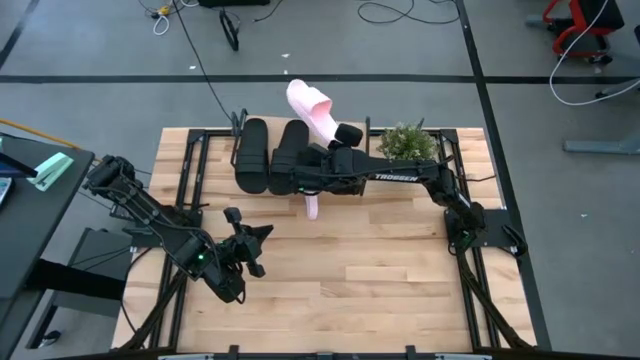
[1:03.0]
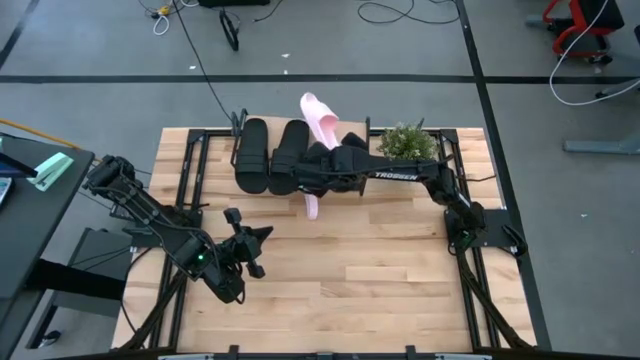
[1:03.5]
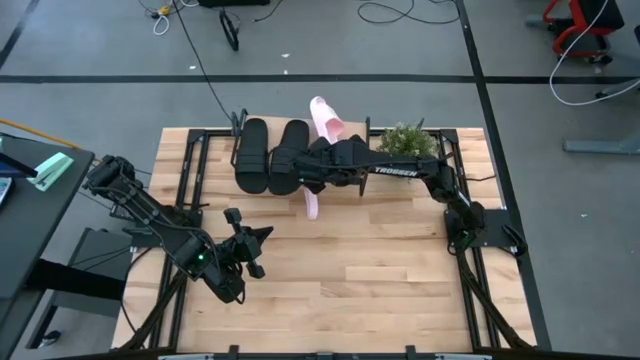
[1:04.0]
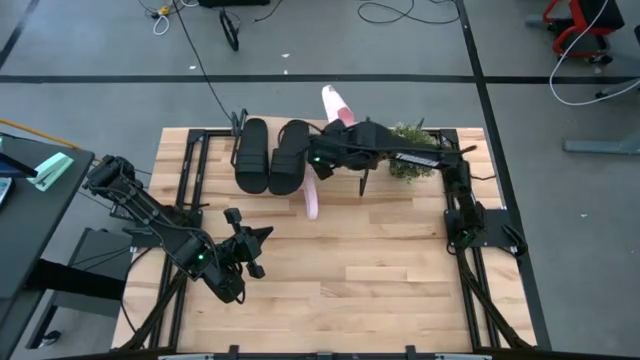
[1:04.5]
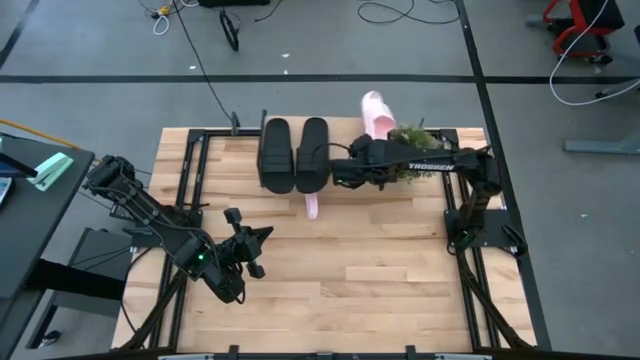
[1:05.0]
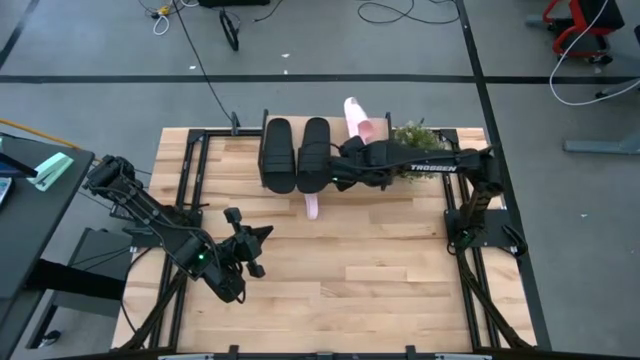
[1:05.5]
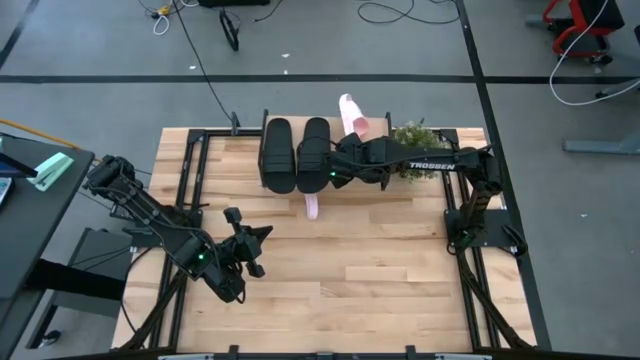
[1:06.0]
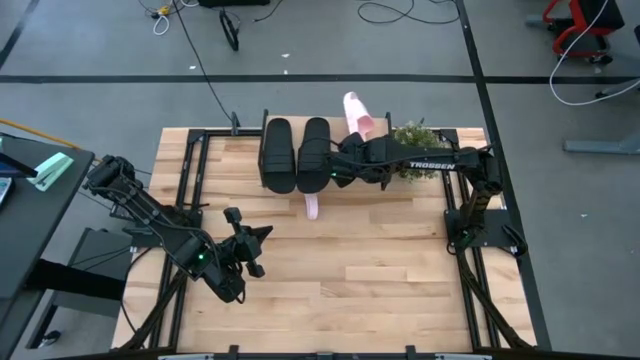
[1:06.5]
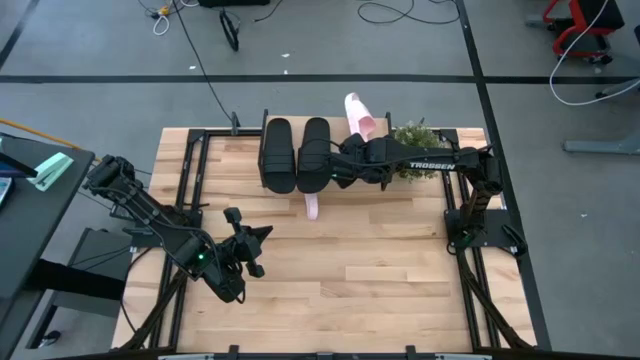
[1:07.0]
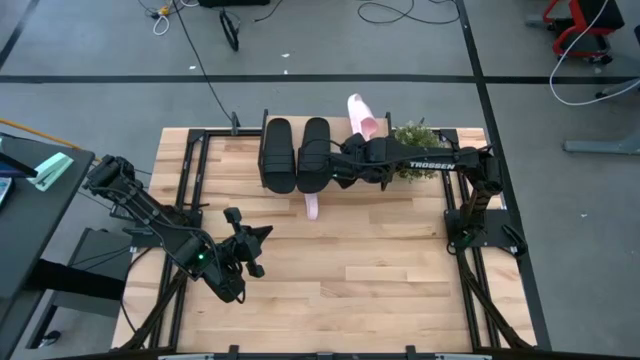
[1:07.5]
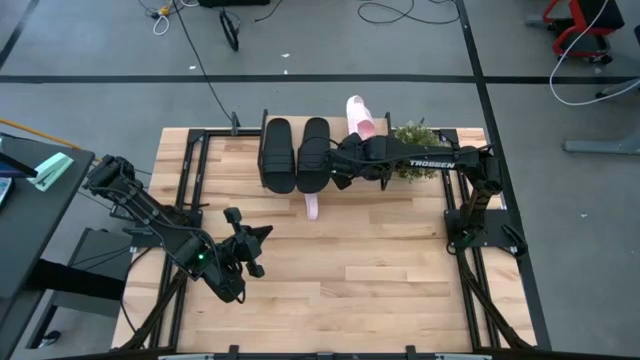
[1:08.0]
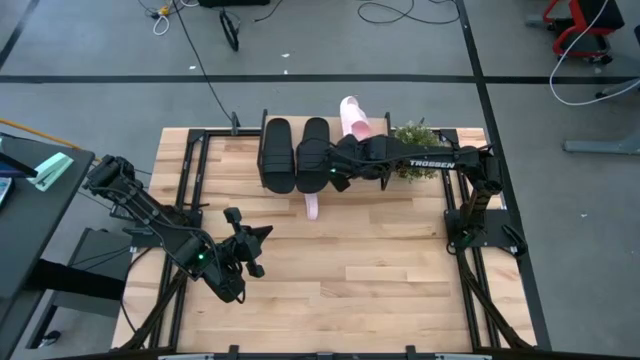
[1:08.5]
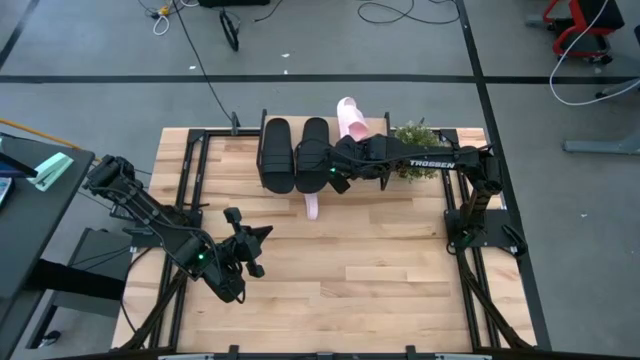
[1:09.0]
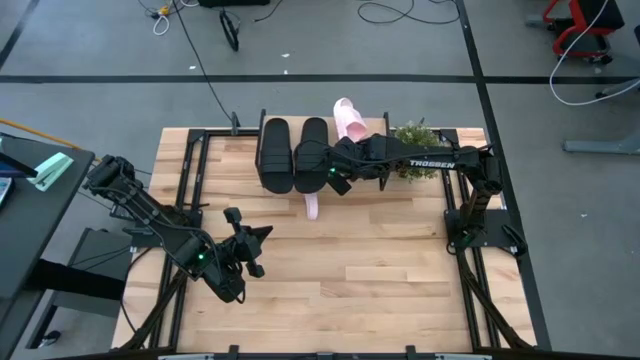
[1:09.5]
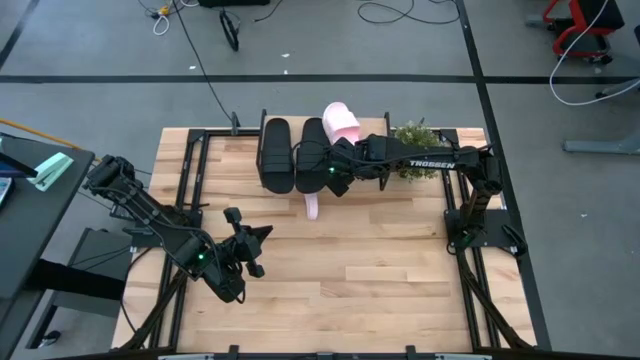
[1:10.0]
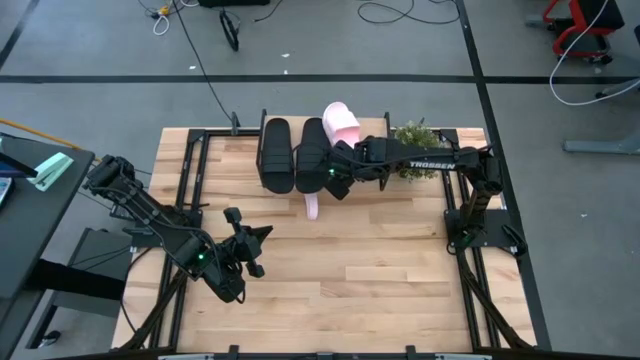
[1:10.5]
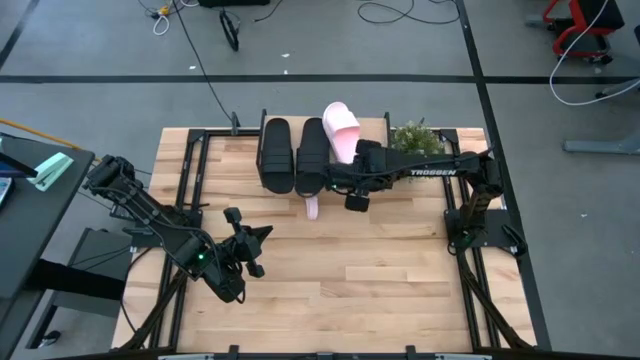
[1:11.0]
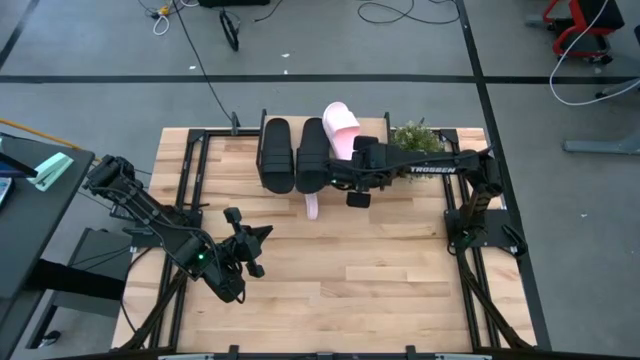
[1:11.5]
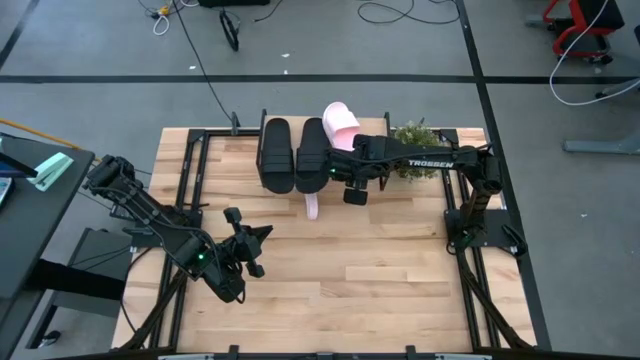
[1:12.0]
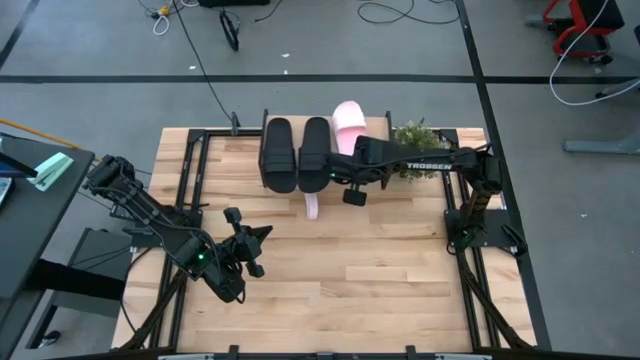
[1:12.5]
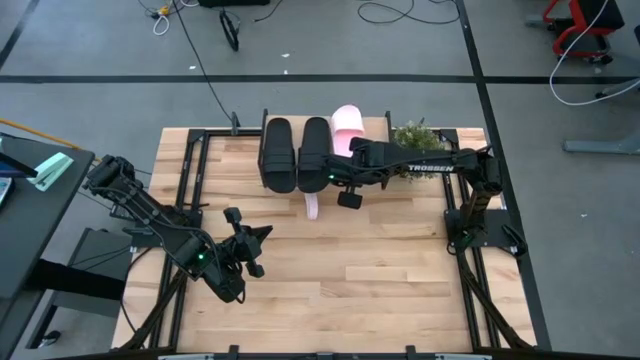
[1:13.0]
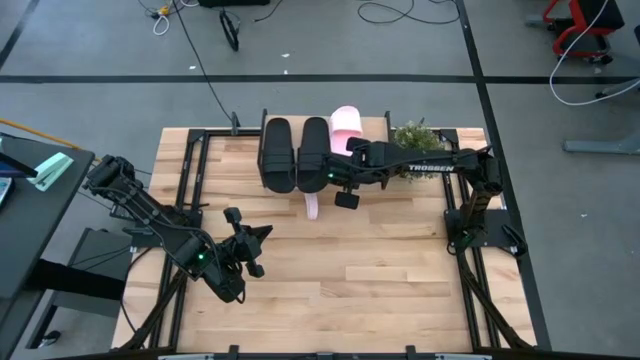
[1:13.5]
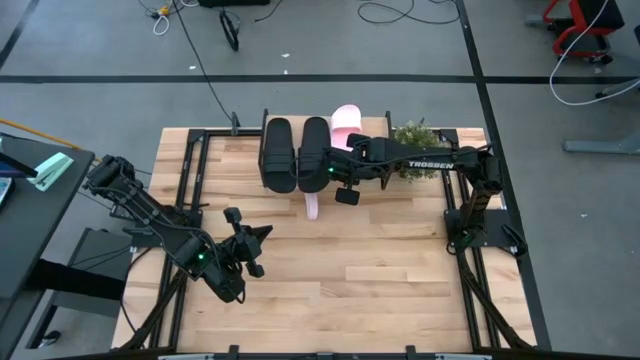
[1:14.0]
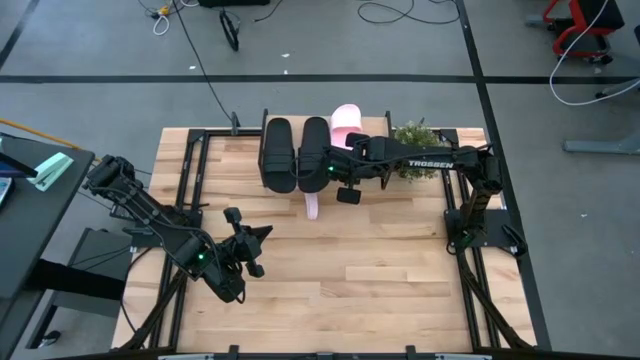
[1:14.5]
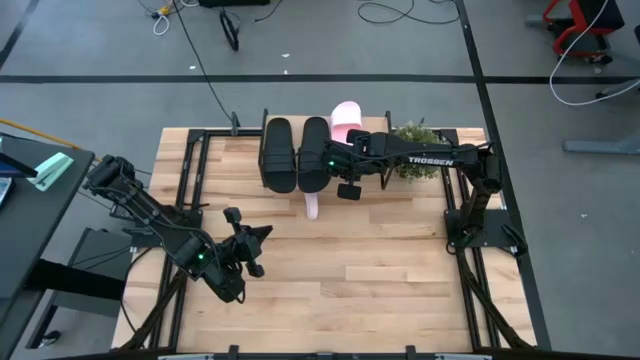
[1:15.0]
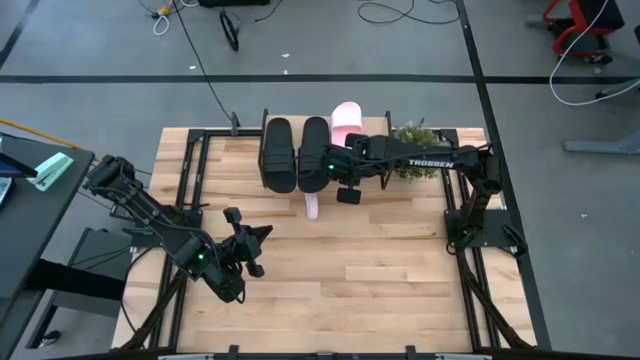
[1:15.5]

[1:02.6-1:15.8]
Task: Pick and place slides into the shelf
Put the right white slide on the shelf

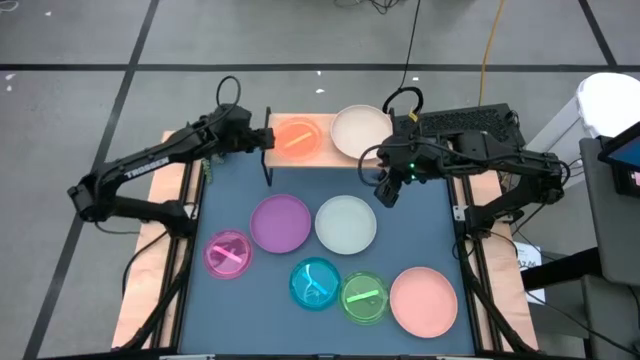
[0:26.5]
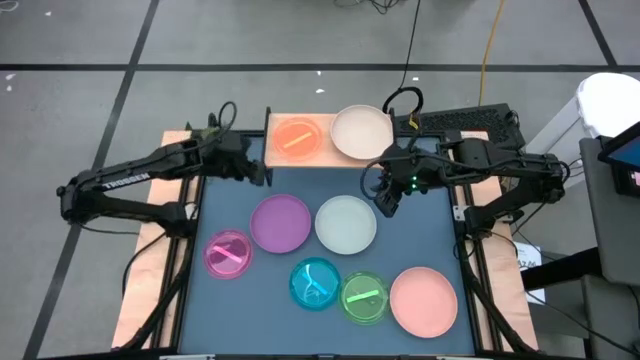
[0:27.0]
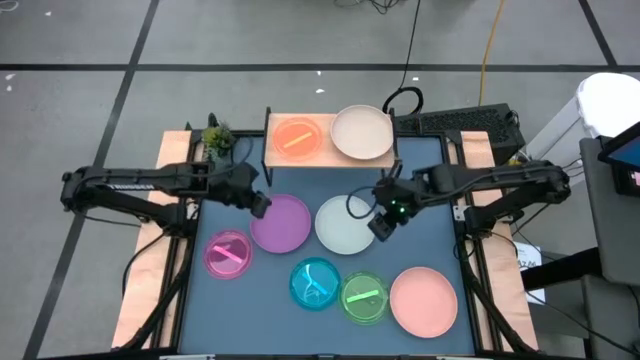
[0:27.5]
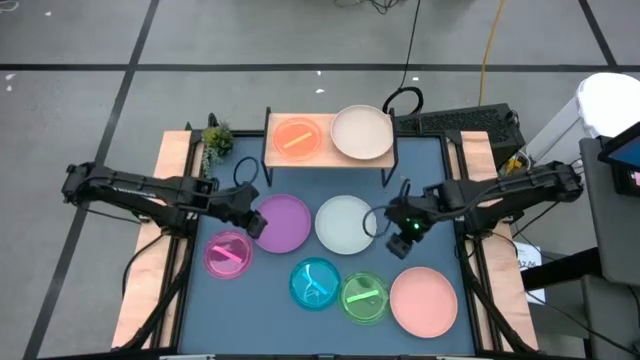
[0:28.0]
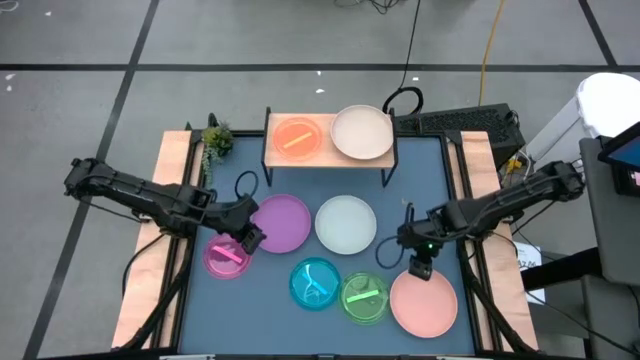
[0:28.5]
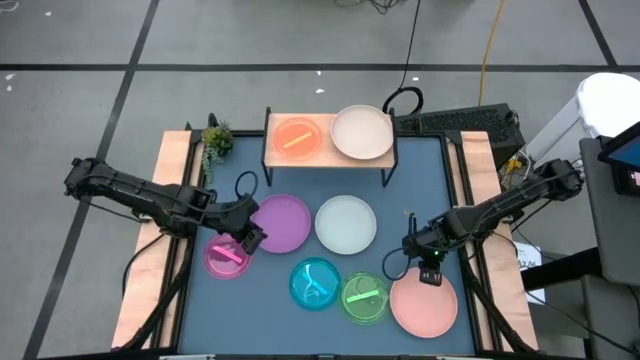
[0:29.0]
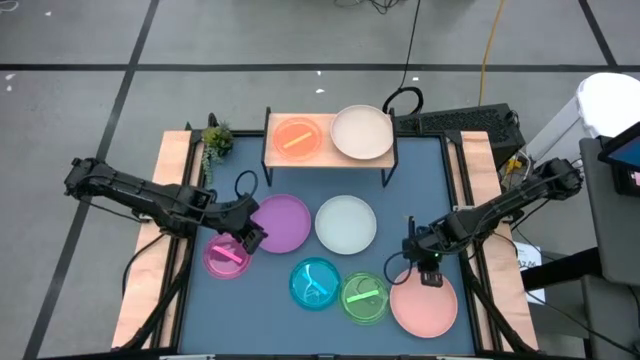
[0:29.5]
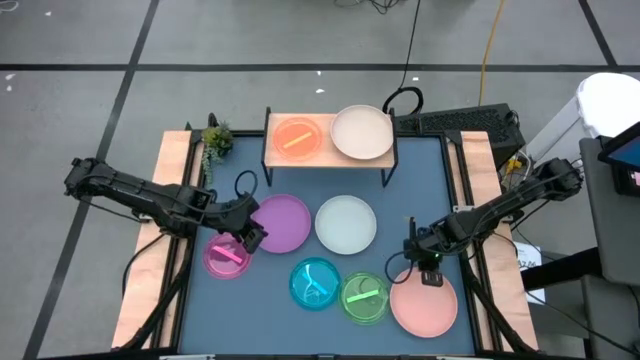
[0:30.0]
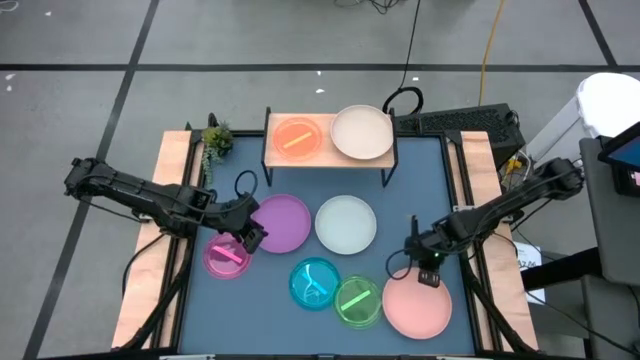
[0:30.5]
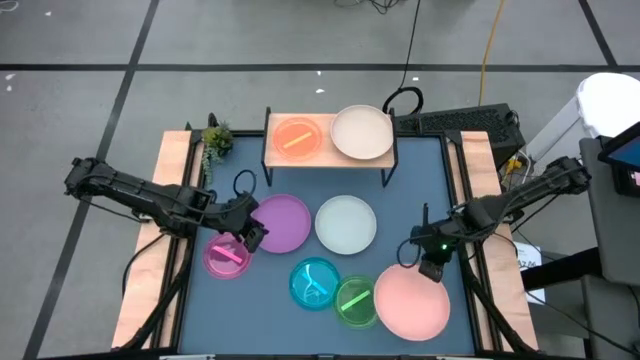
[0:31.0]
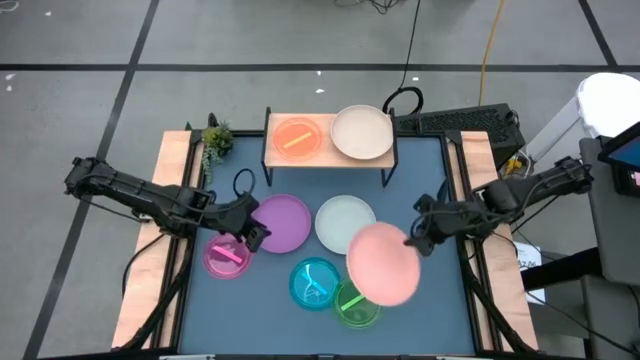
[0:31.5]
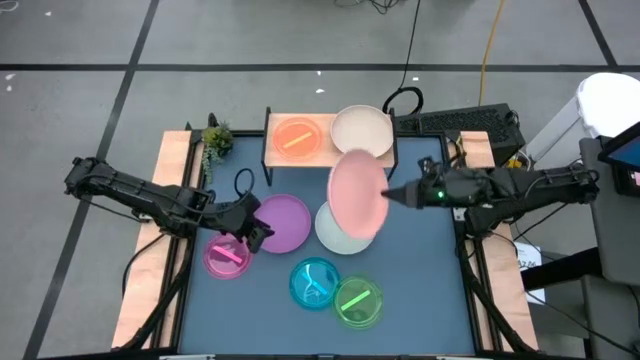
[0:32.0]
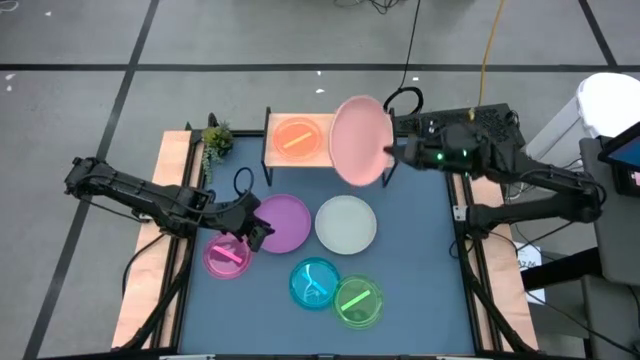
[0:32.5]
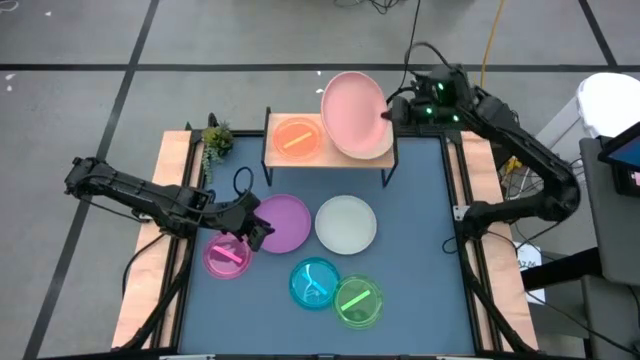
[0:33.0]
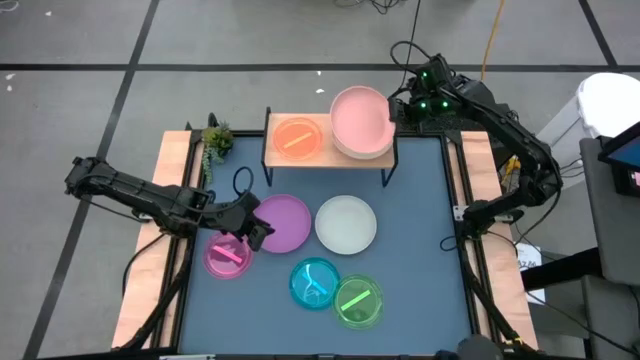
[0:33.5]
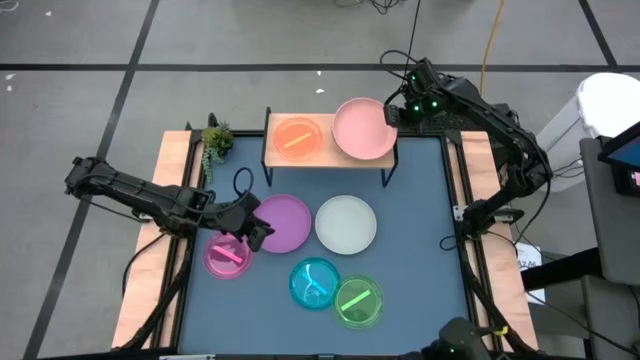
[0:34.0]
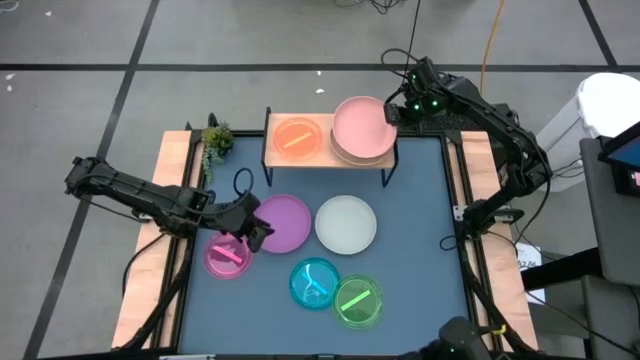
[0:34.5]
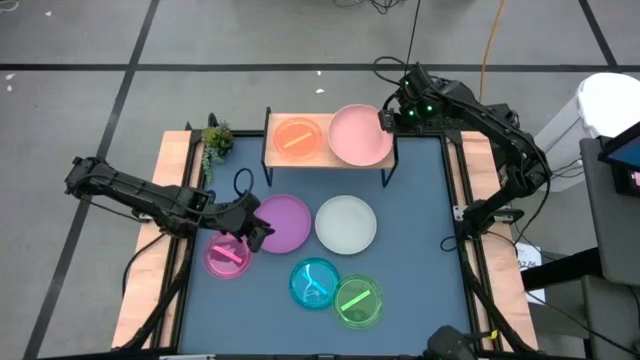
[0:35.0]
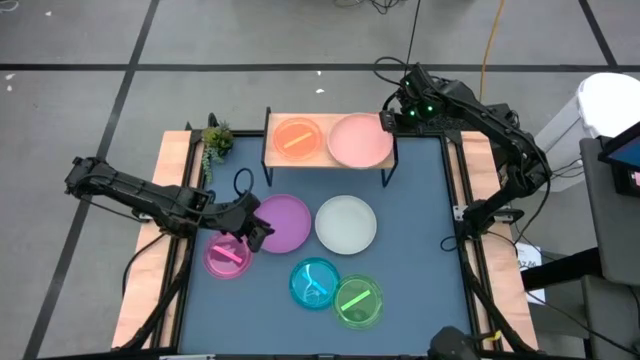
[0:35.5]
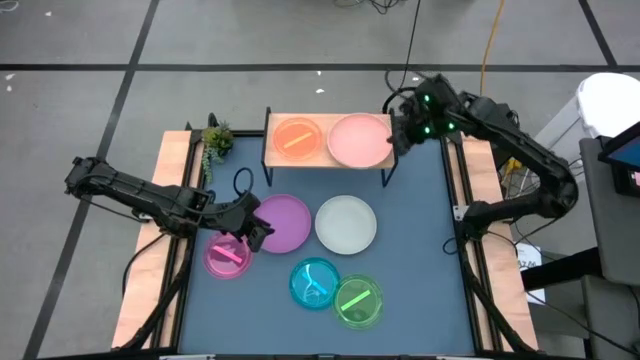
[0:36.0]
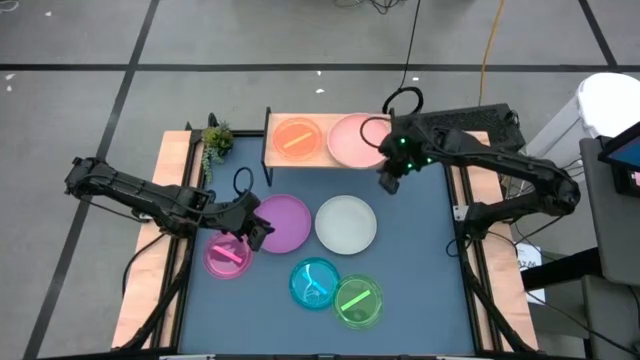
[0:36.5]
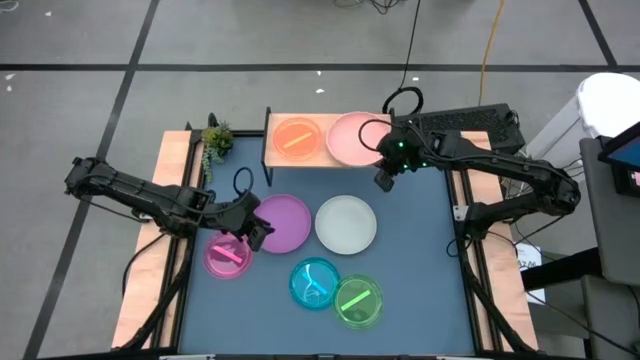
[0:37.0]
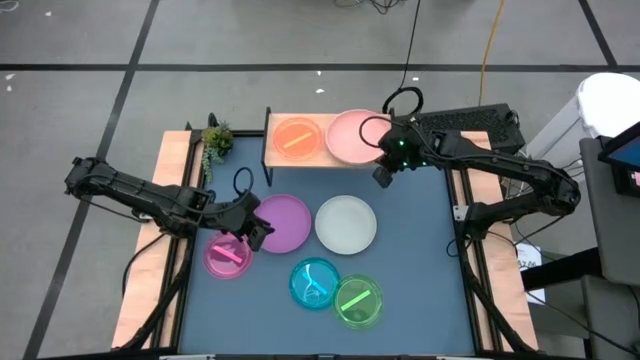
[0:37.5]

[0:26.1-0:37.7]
Task: Place and stack plates onto a shelf
Stack the light pink plate on top of the white plate on the shelf
